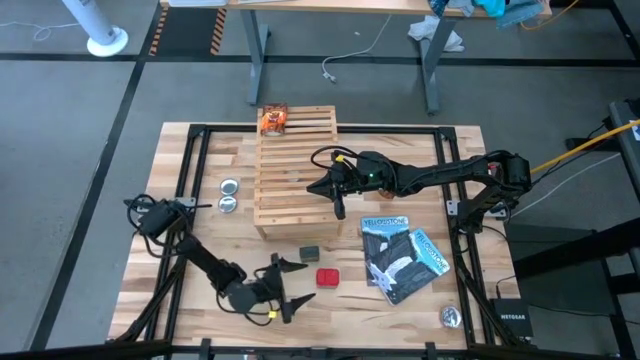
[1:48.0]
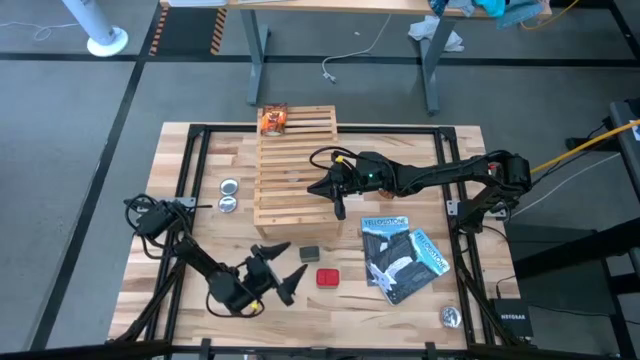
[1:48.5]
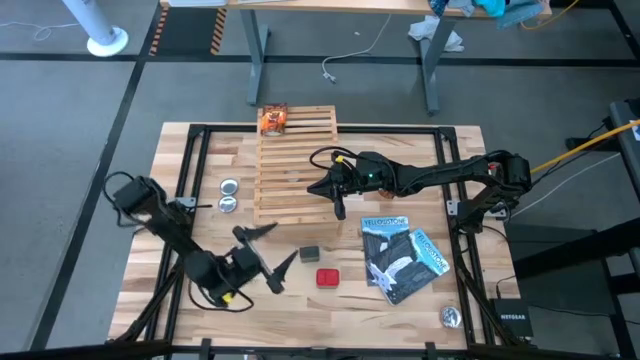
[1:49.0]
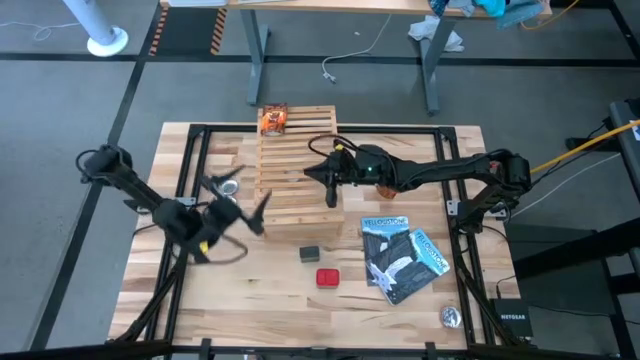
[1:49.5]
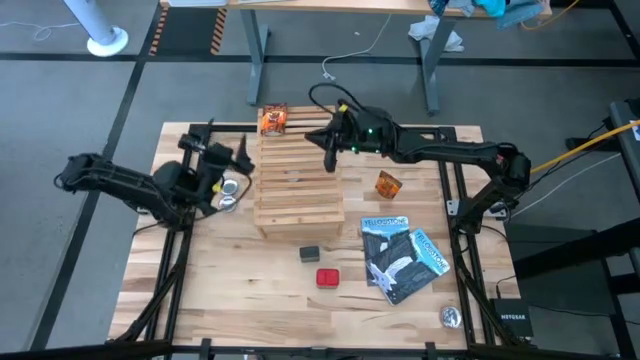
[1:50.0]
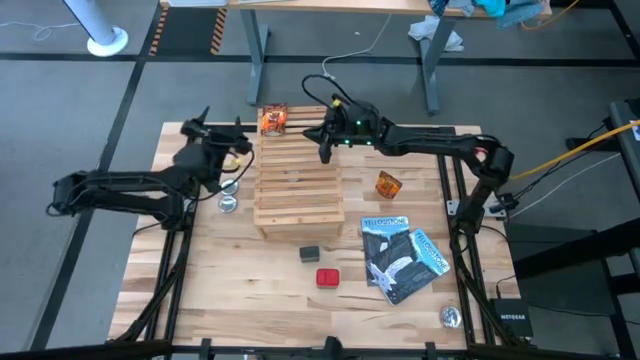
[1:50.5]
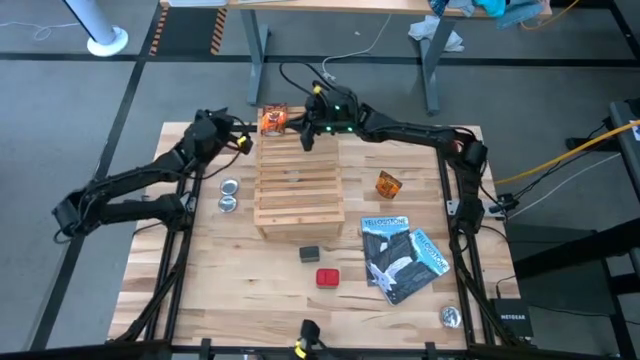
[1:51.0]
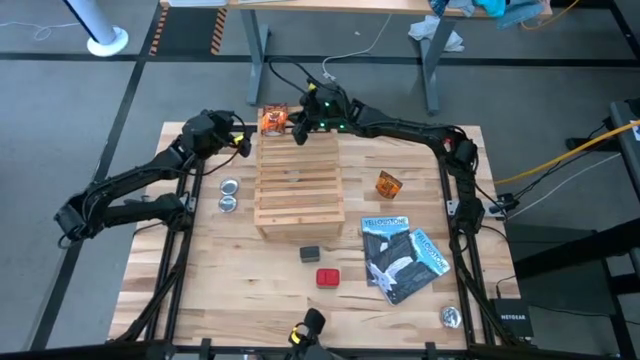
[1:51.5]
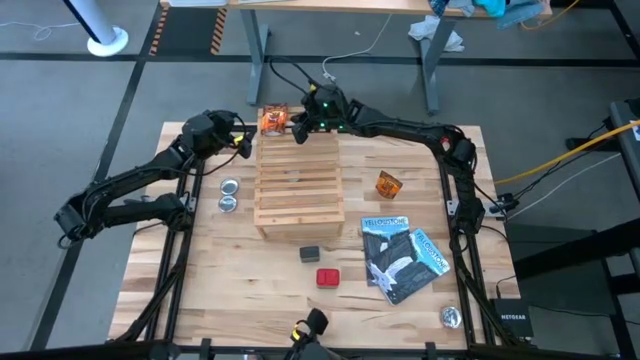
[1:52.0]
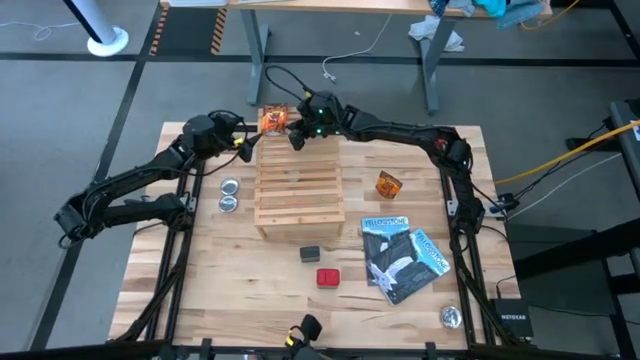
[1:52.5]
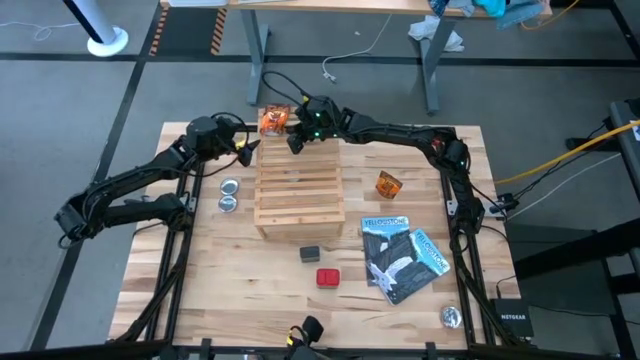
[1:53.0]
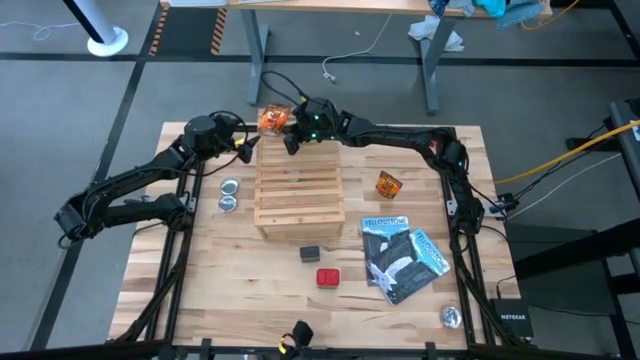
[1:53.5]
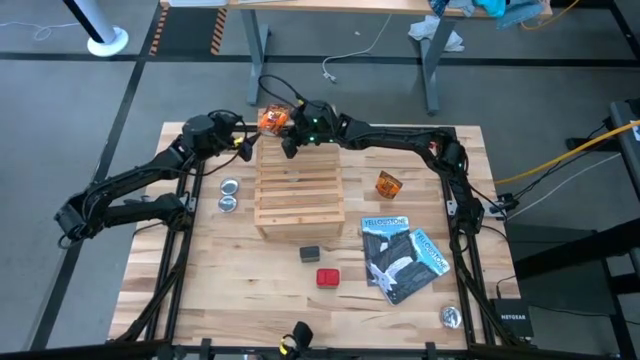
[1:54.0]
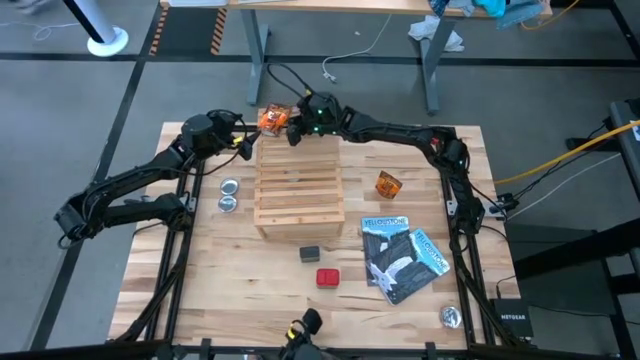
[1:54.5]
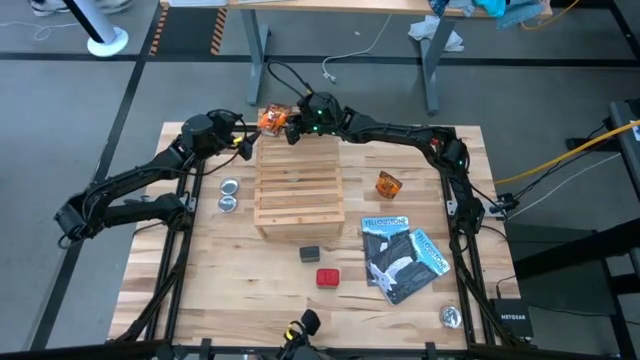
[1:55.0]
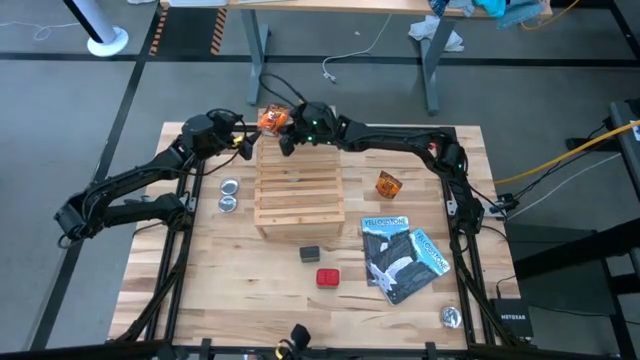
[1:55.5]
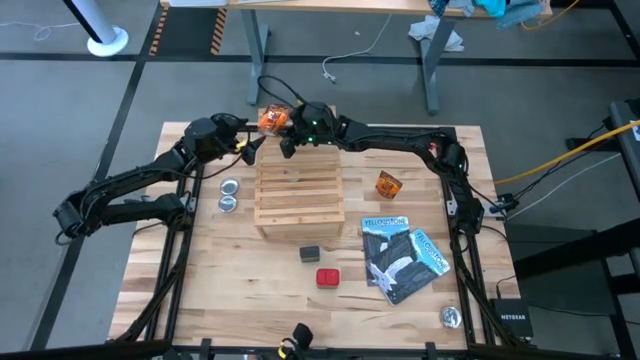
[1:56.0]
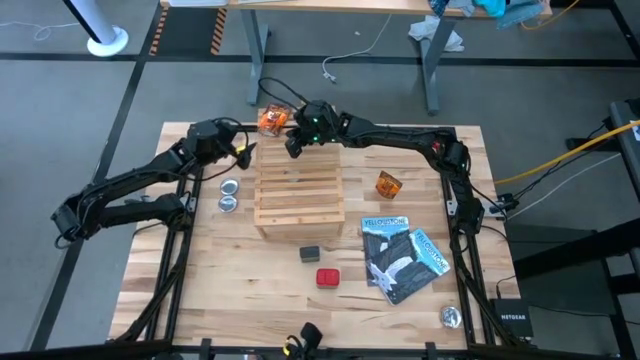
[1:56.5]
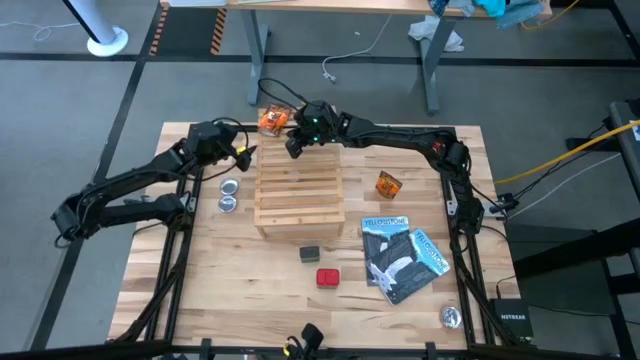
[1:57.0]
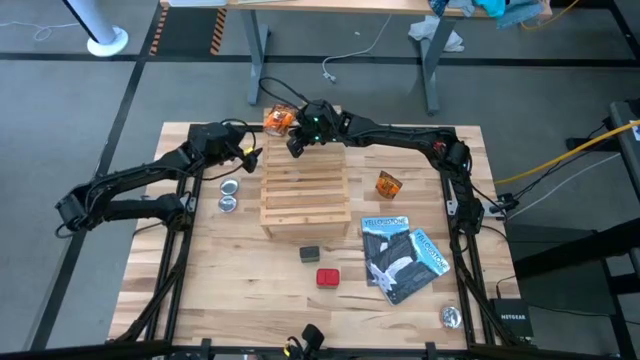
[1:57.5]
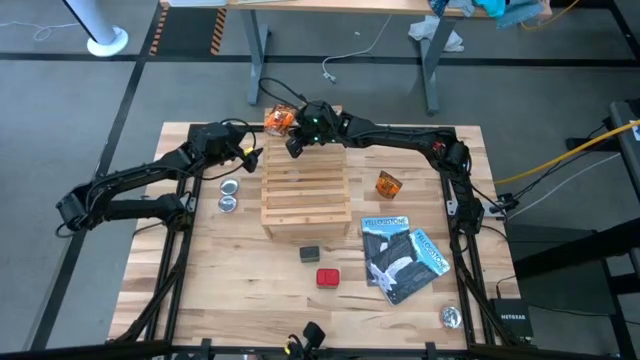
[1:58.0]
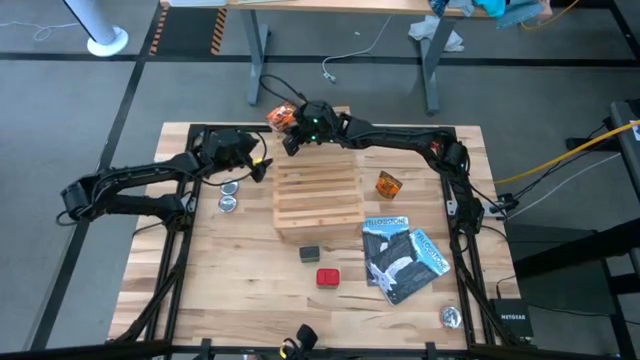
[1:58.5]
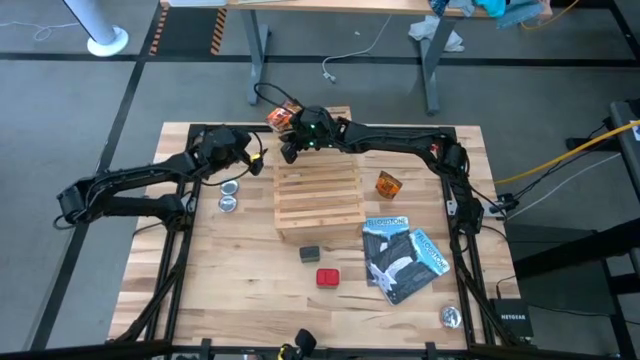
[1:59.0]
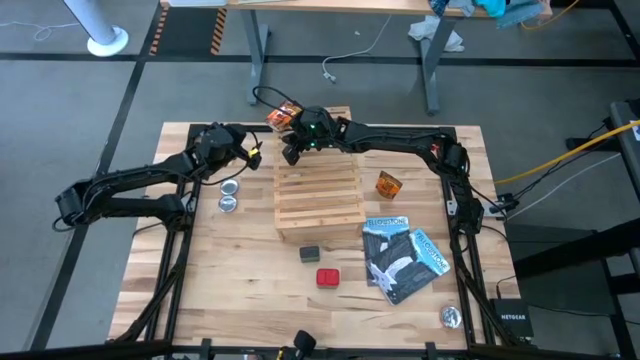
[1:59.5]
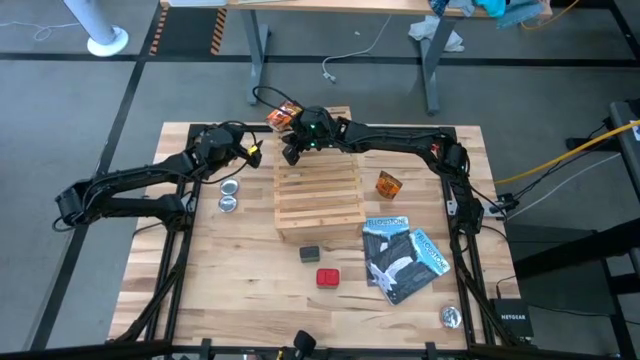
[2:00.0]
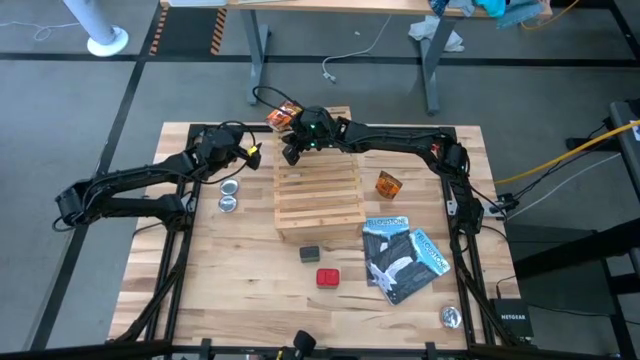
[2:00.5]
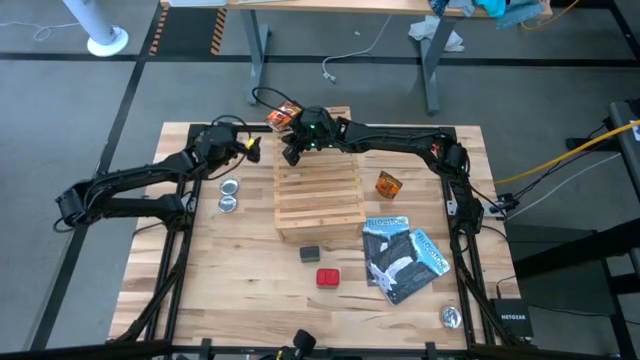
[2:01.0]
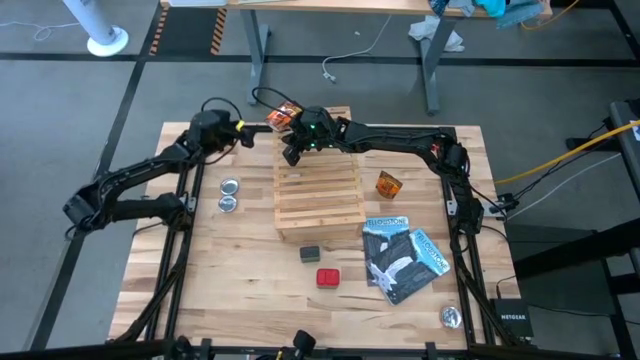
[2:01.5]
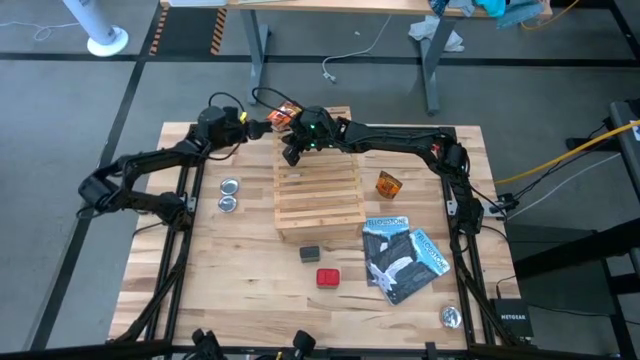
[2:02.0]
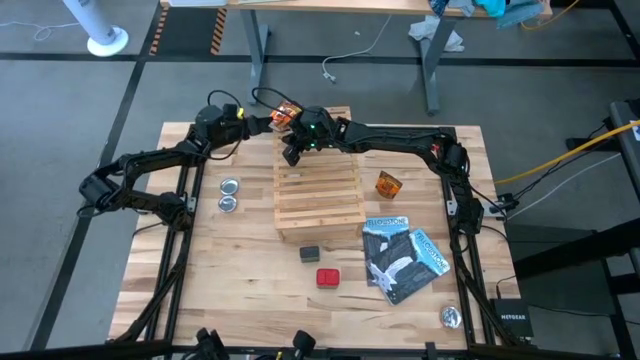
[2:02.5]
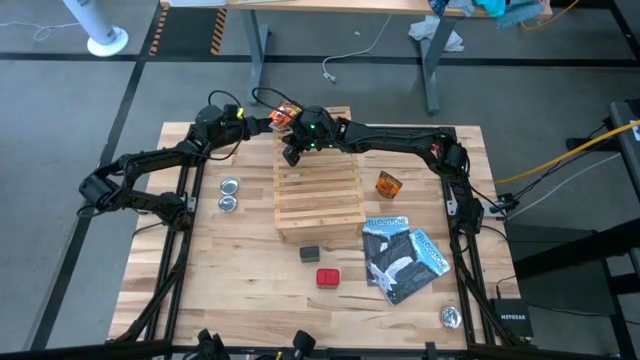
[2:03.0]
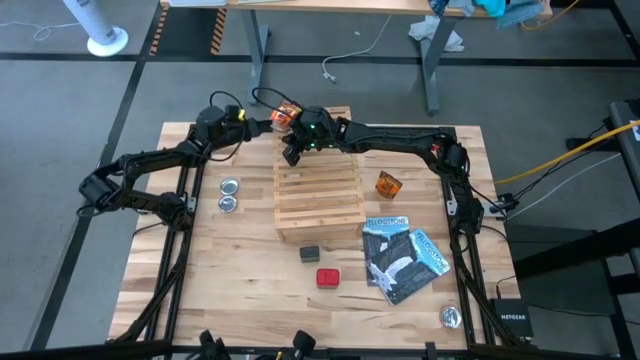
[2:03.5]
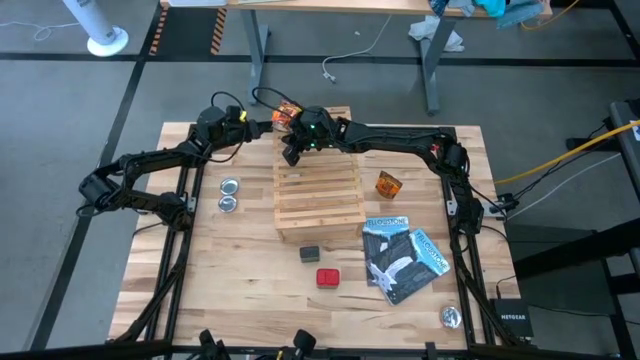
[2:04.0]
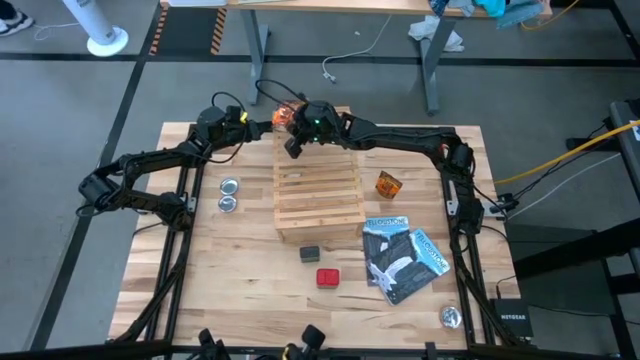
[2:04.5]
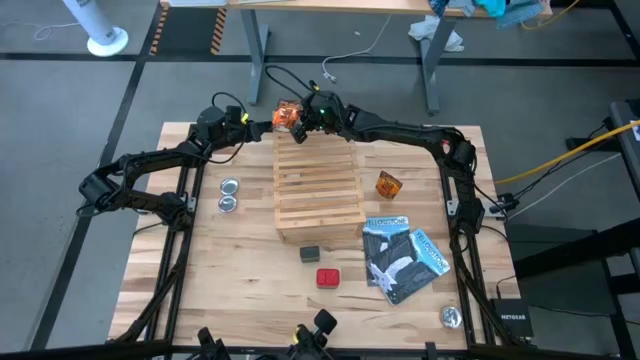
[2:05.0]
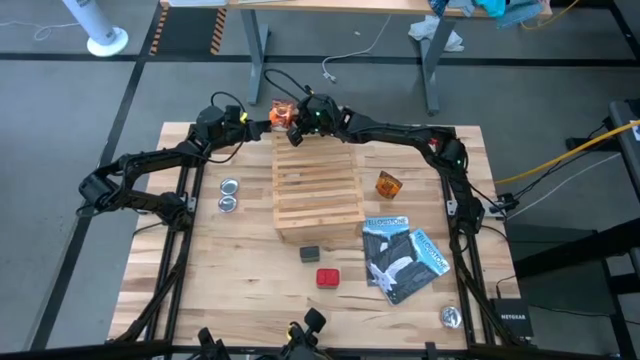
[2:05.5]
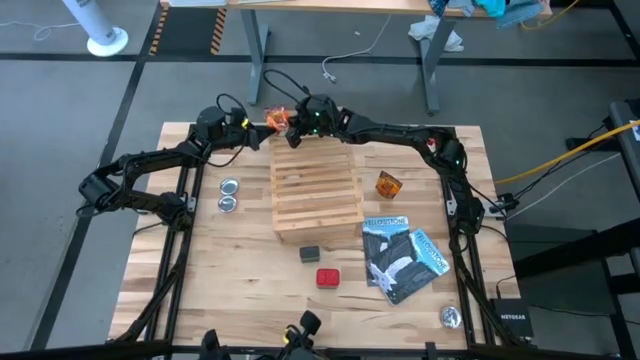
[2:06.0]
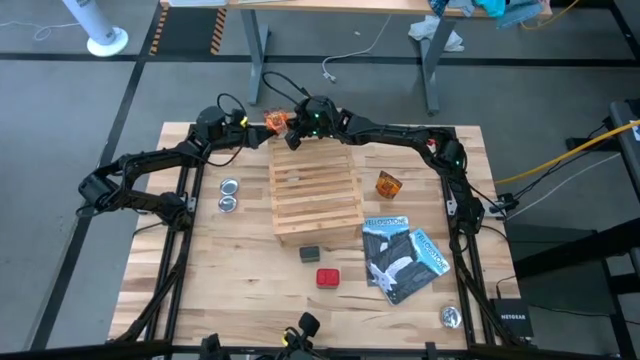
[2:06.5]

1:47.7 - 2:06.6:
Task: Shelf spices
Remove the orange seasoning pack from the shelf

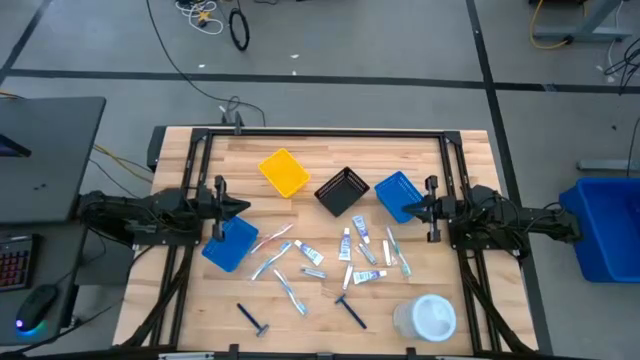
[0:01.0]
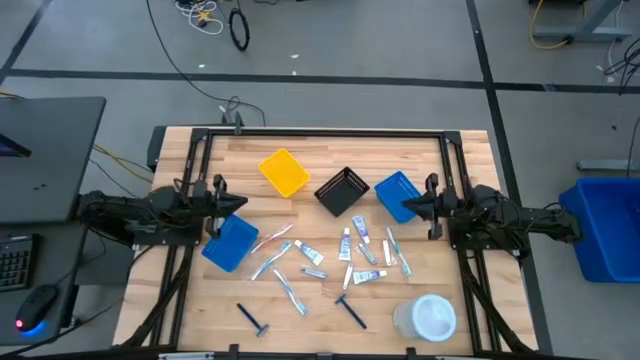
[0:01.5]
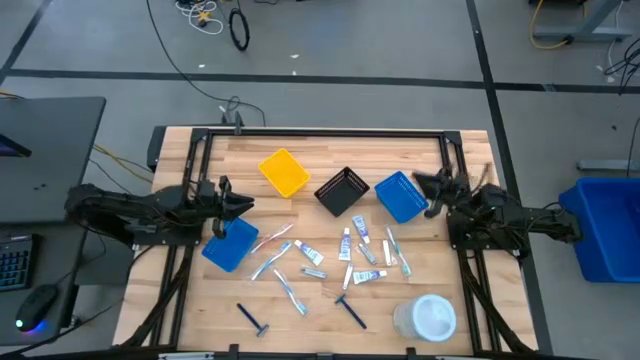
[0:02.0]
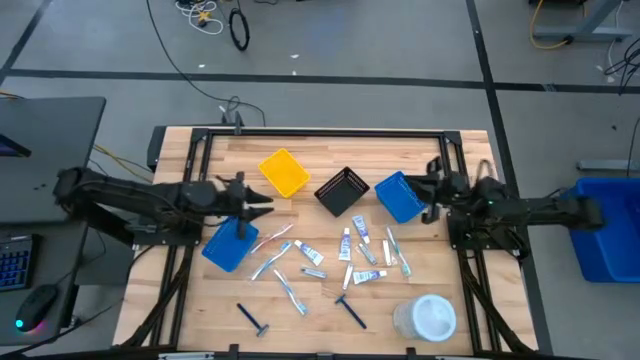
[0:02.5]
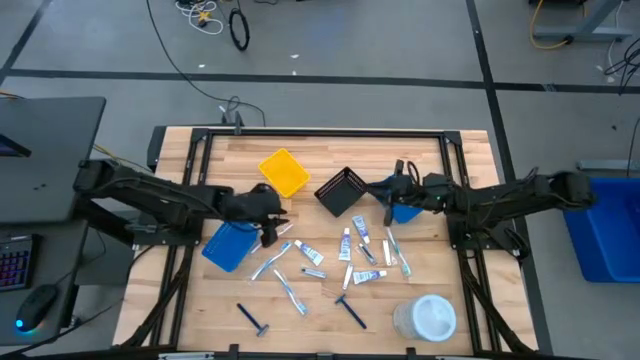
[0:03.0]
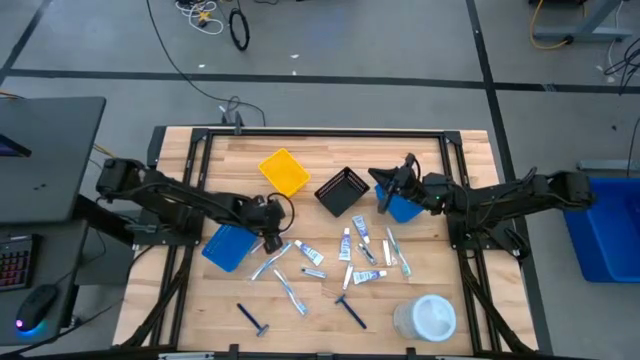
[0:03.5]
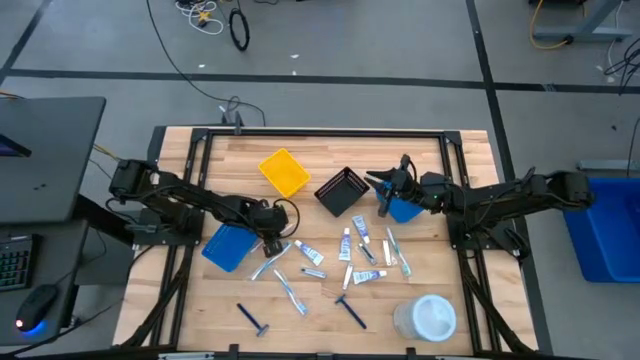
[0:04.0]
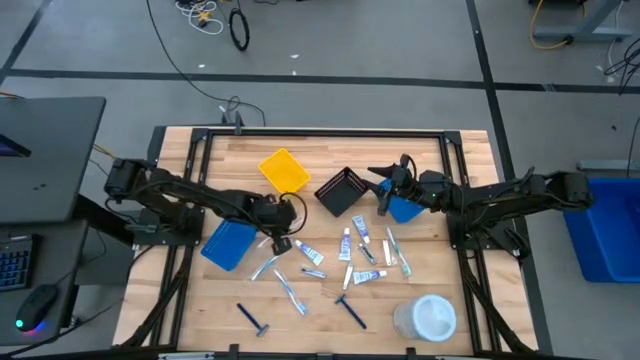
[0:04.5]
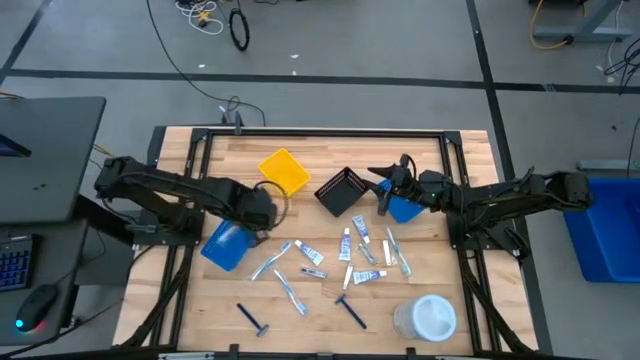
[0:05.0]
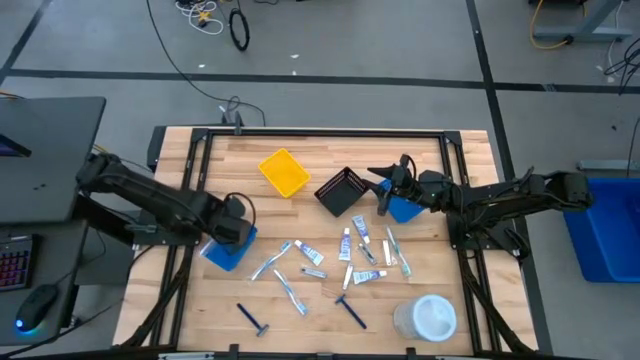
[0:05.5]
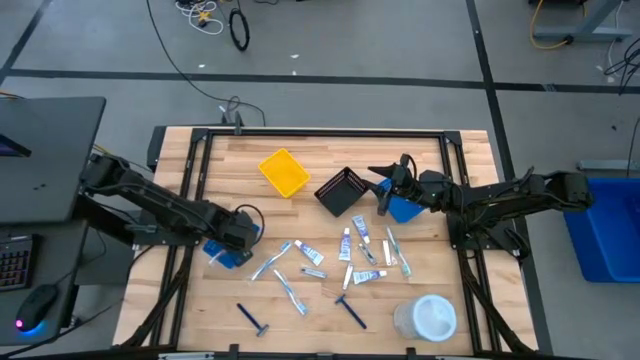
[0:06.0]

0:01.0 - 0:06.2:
Task: Pick & Place Travel size toiletries
Put the orange toothbrush into the left blue bin
